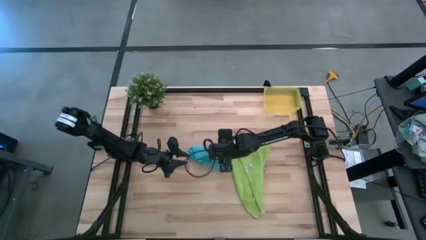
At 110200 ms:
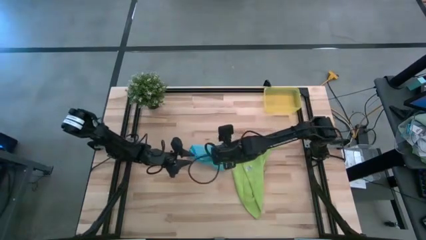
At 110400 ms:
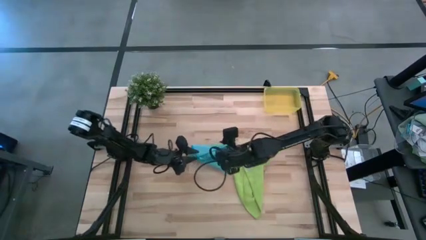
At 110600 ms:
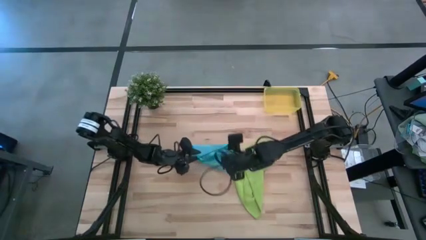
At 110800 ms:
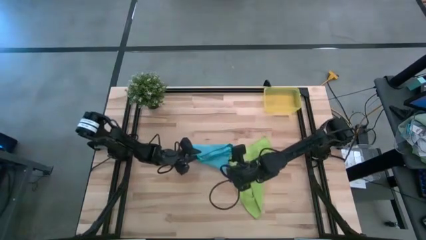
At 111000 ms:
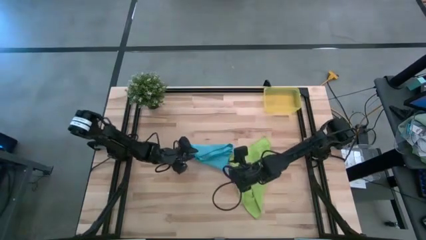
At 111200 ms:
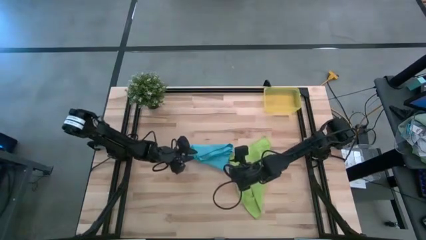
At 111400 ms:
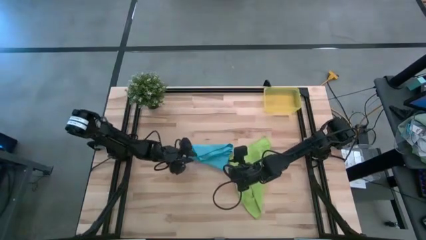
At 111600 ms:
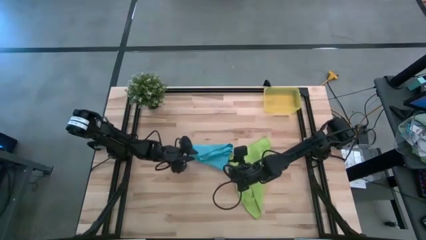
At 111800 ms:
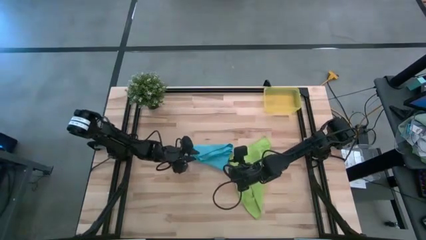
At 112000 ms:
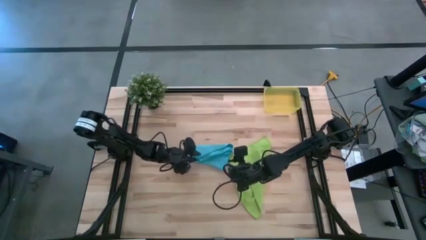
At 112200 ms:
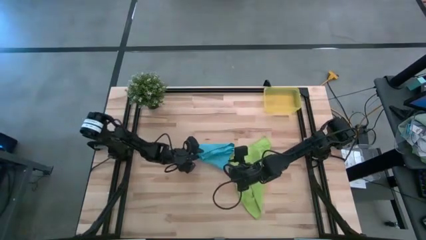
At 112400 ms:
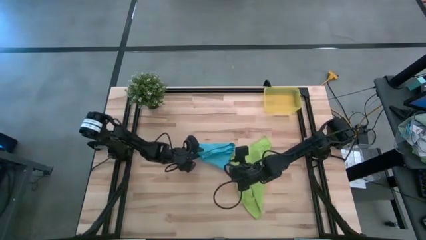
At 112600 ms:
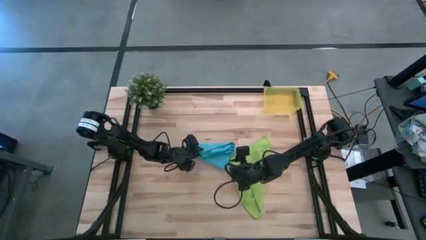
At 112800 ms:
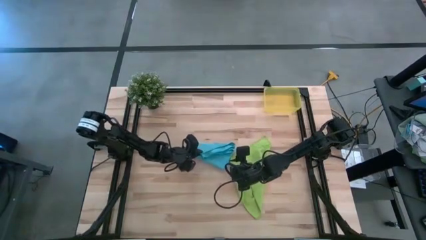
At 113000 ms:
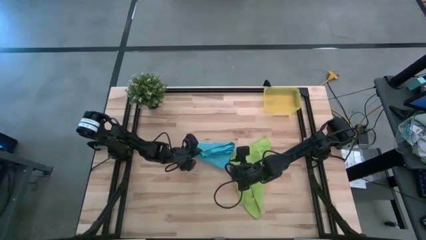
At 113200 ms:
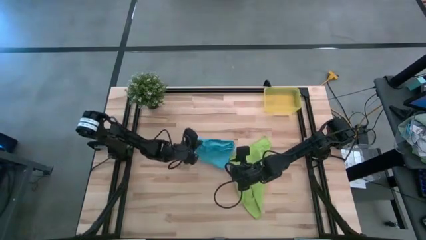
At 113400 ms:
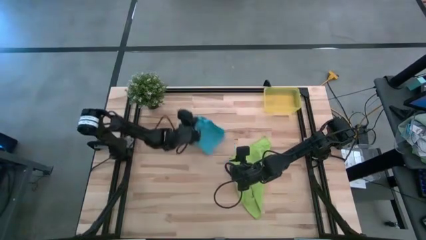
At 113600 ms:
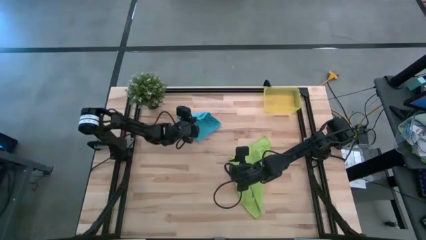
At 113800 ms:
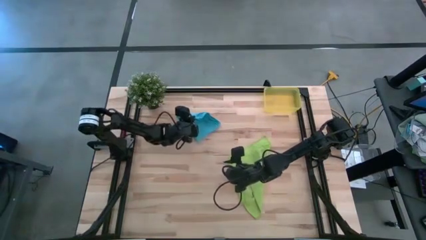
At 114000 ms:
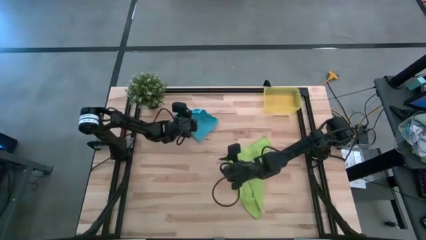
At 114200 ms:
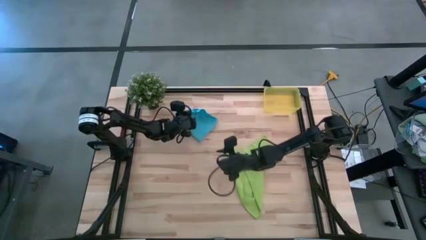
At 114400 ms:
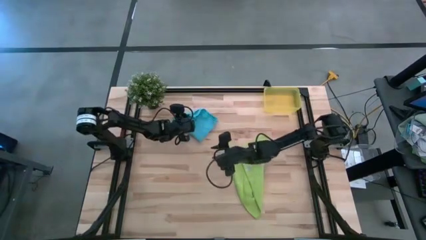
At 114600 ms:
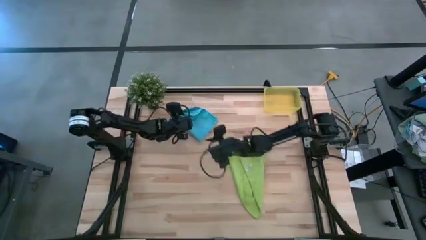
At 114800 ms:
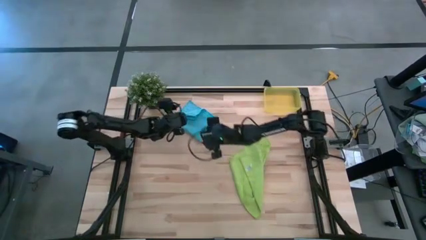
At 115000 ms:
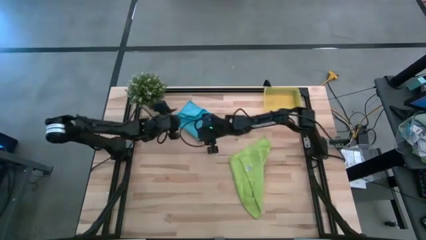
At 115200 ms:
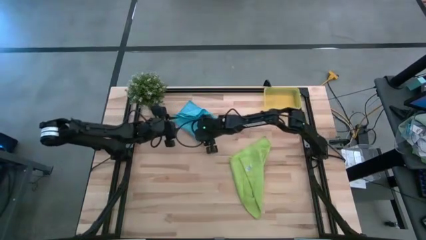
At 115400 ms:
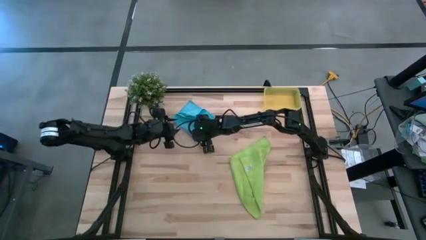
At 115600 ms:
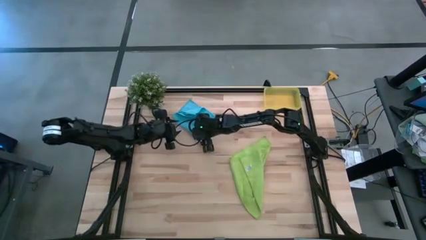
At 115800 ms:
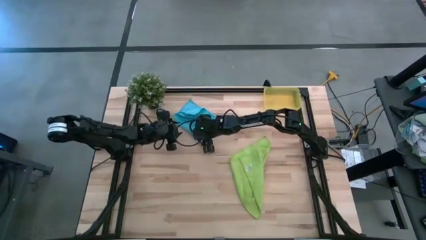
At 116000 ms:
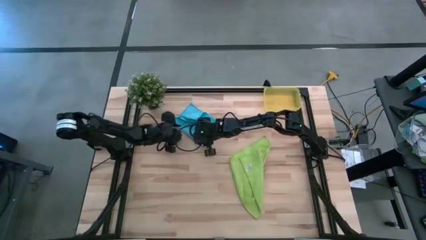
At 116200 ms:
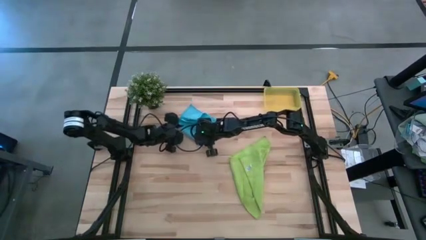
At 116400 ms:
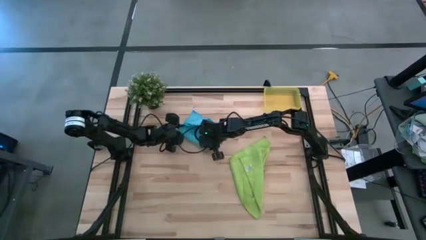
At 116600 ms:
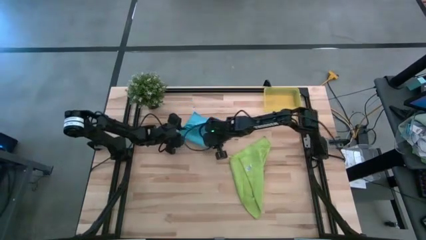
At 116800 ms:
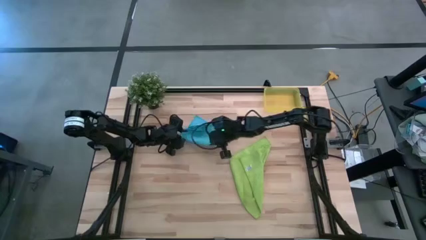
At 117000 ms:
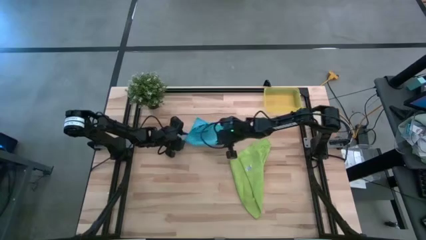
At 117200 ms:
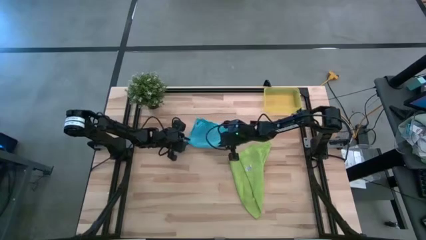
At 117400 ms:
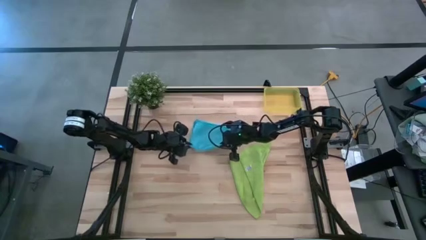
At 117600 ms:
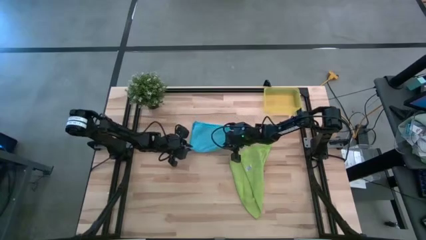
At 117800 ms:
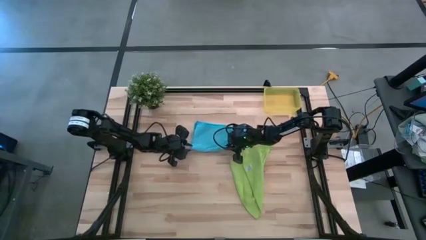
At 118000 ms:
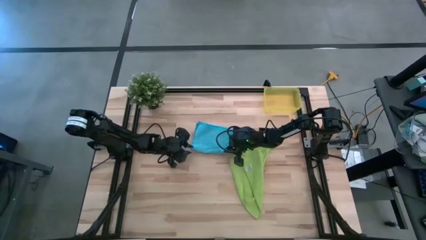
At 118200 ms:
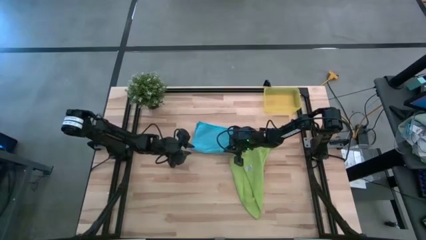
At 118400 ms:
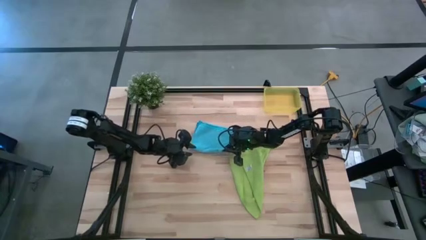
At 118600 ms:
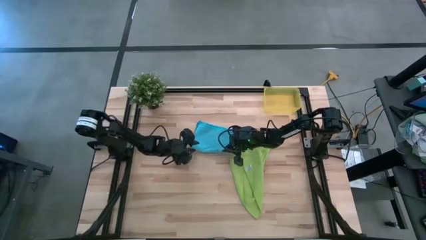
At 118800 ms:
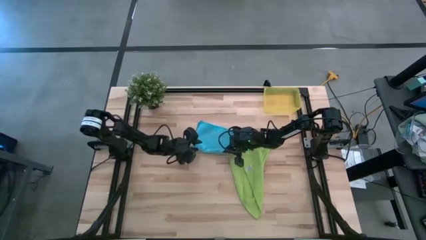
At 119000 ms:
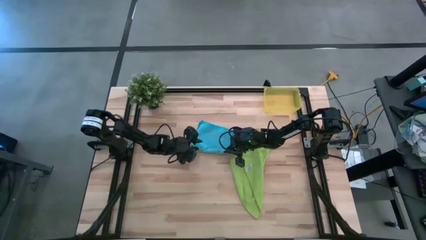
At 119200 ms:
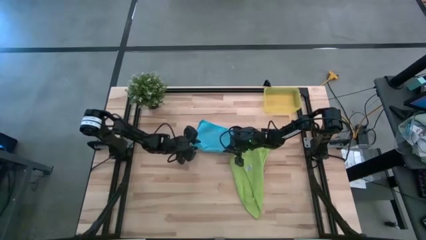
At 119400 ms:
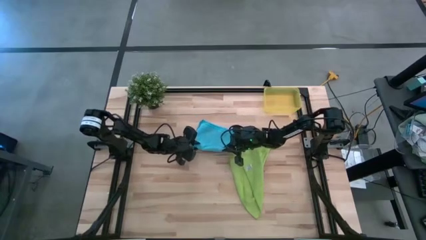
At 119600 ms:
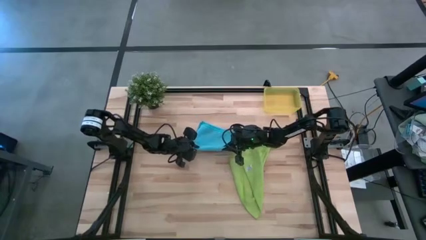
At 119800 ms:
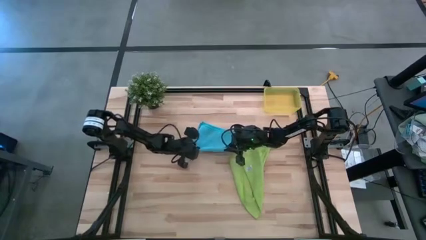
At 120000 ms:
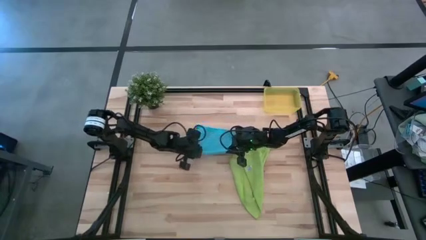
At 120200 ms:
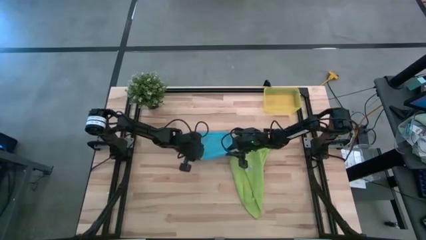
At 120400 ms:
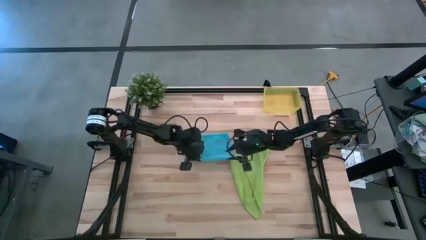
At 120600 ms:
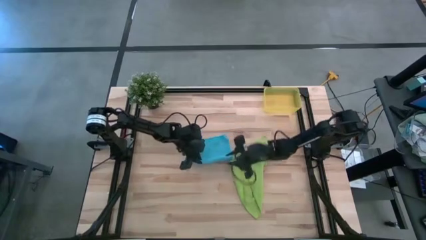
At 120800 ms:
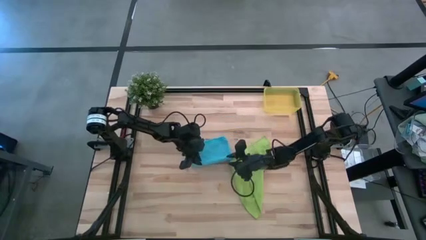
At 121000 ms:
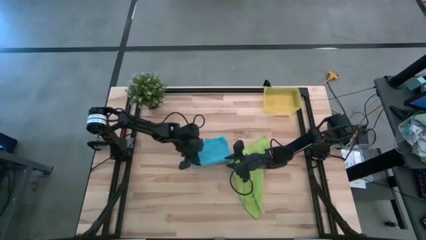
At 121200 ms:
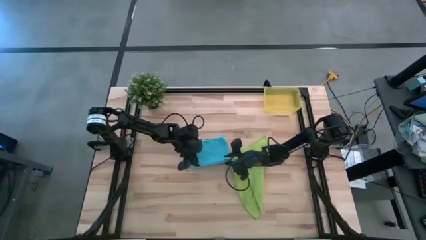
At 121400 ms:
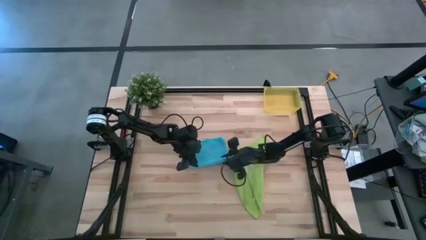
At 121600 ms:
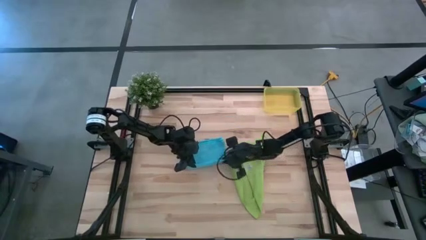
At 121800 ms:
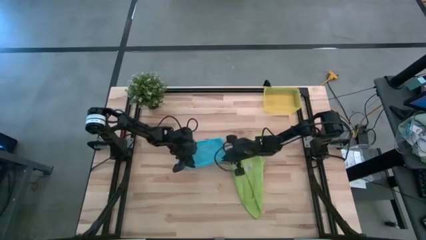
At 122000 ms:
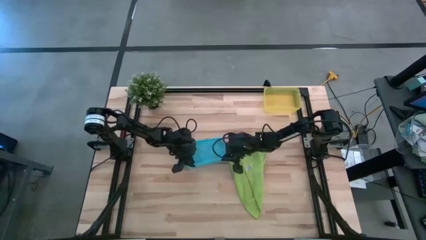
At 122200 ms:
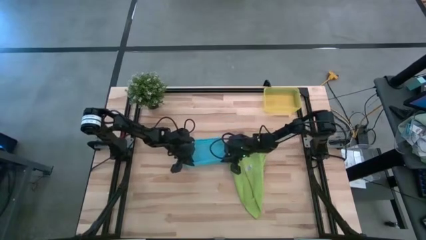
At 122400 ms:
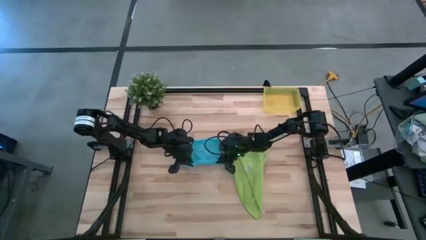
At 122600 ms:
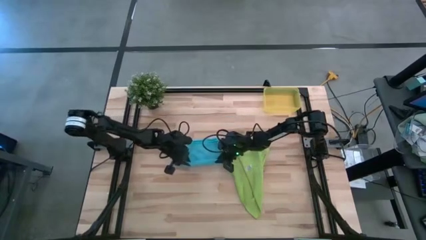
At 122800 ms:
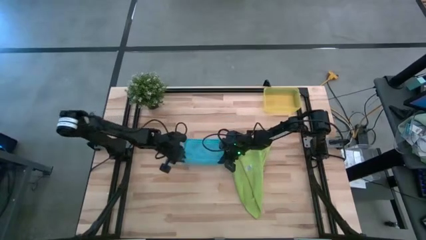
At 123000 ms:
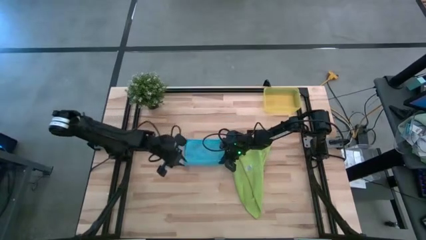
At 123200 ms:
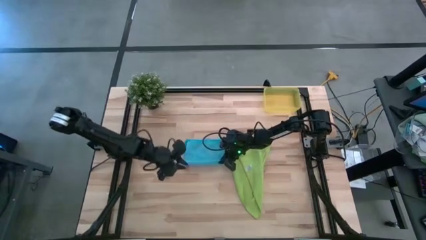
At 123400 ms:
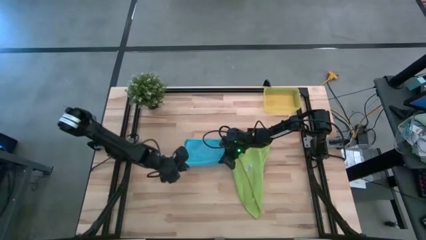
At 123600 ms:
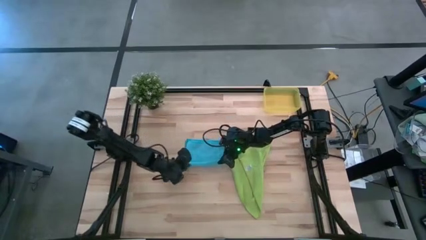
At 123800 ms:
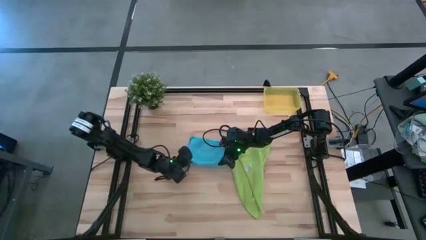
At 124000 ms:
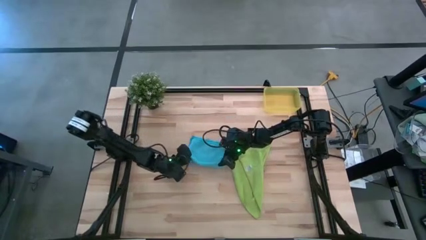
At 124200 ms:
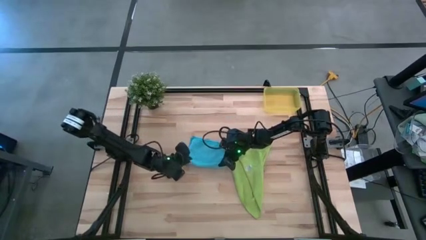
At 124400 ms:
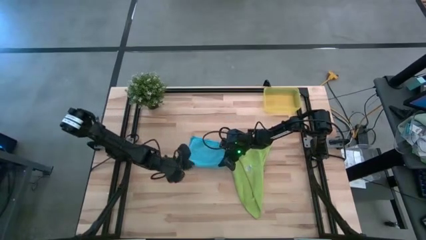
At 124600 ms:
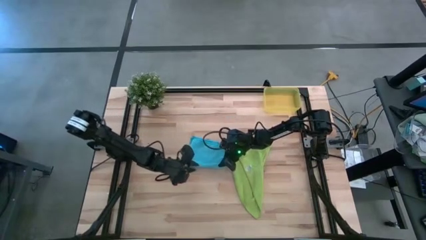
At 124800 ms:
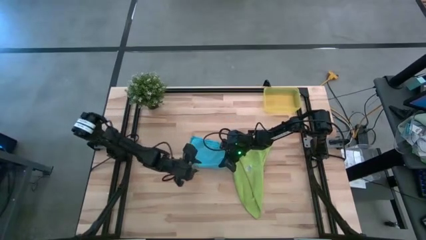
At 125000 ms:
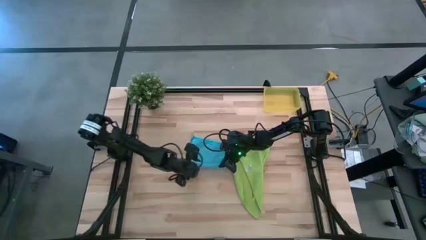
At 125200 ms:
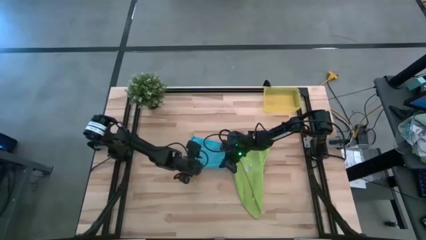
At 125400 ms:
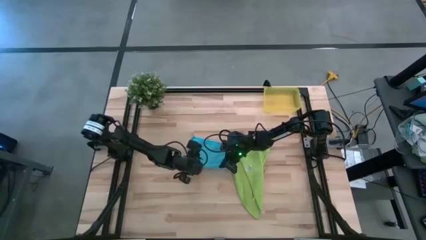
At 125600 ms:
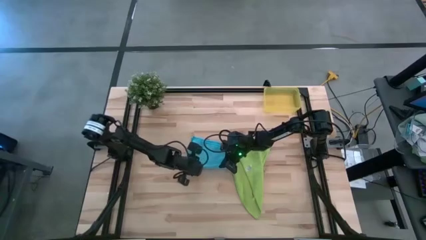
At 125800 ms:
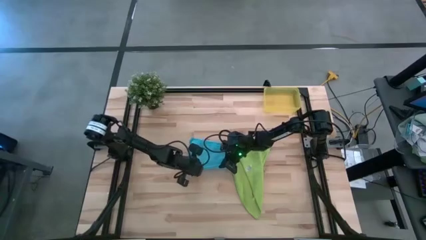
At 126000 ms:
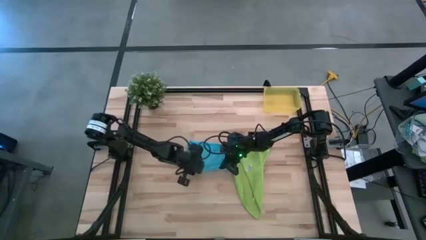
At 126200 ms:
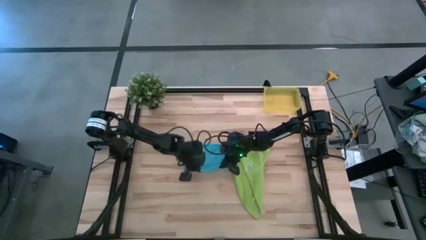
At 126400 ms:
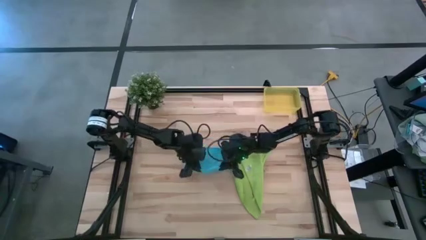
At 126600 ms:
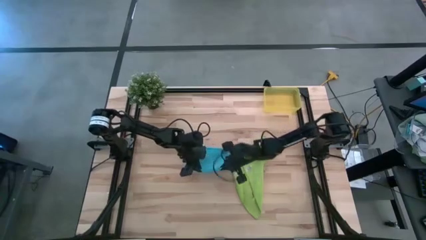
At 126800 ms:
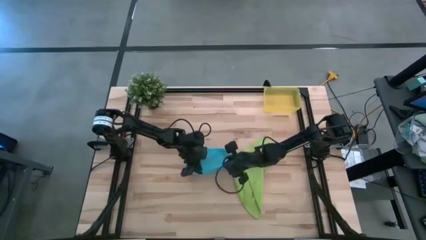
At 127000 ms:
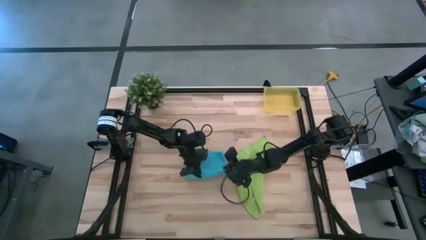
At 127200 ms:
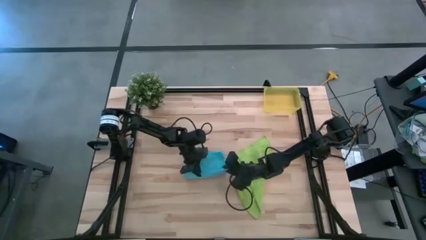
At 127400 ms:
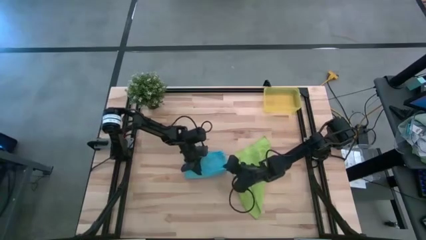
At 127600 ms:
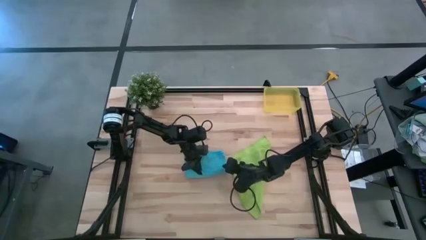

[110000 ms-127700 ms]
Task: Roll microfiber towels into tight, uniform cylinder then place into a basket
Roll the blue microfiber towel
